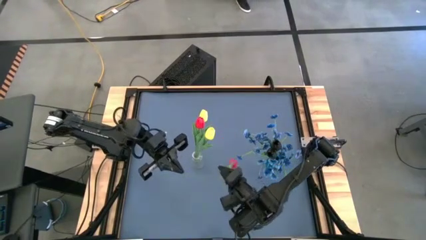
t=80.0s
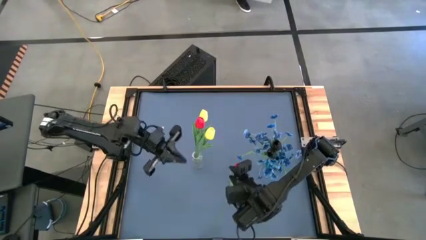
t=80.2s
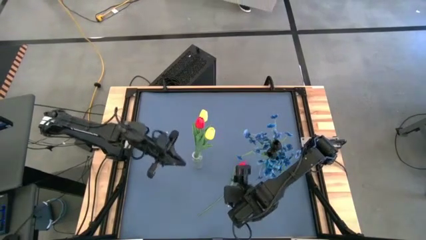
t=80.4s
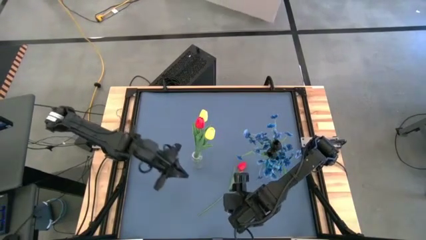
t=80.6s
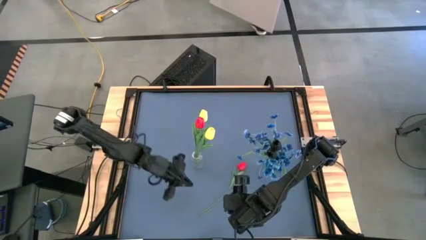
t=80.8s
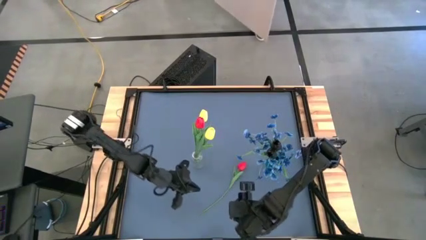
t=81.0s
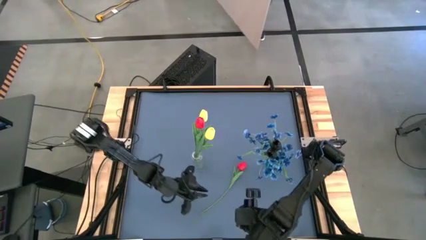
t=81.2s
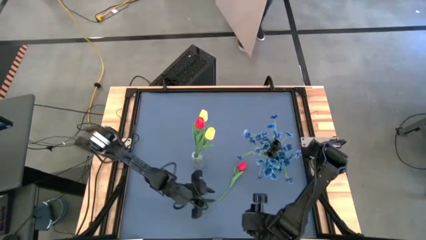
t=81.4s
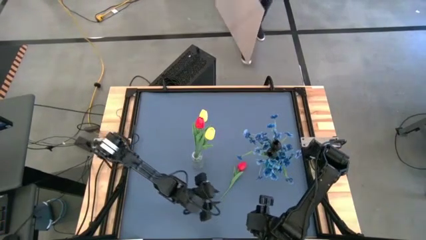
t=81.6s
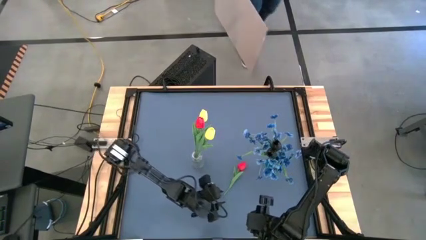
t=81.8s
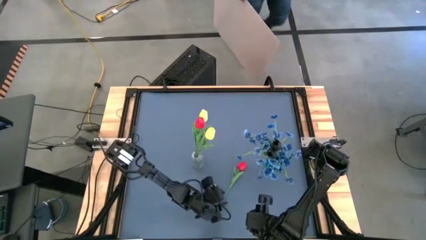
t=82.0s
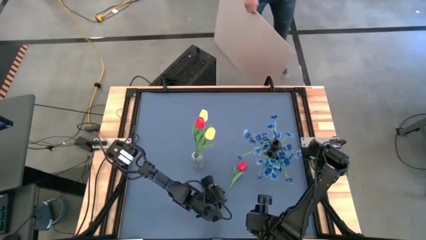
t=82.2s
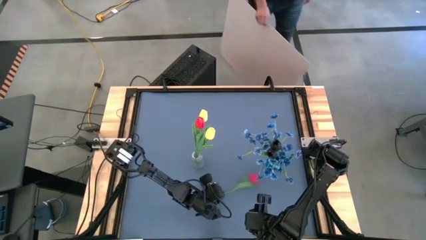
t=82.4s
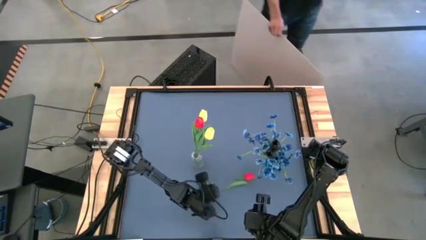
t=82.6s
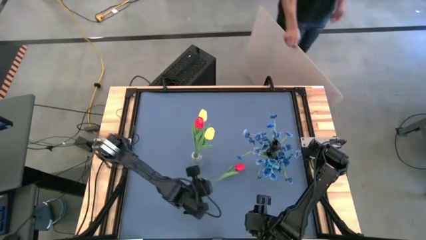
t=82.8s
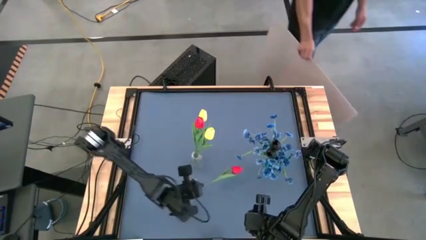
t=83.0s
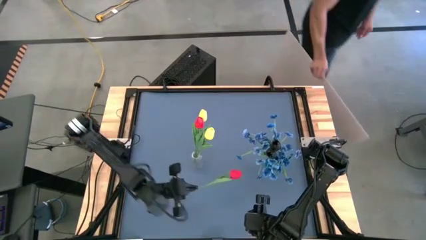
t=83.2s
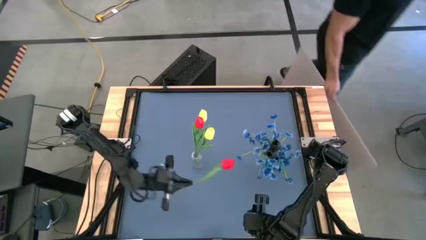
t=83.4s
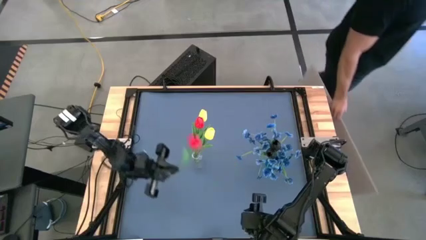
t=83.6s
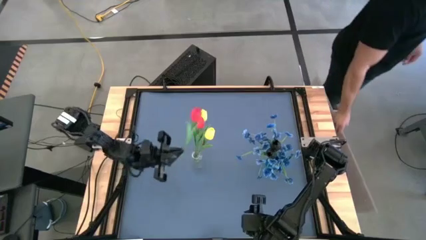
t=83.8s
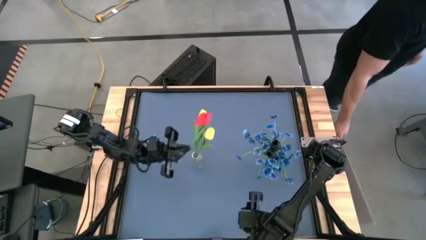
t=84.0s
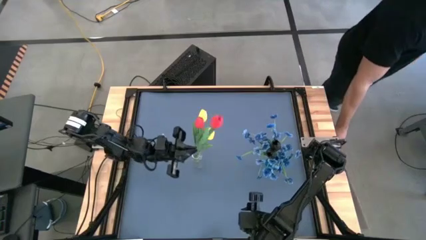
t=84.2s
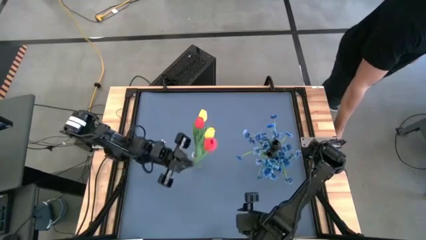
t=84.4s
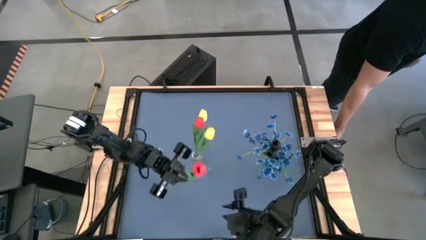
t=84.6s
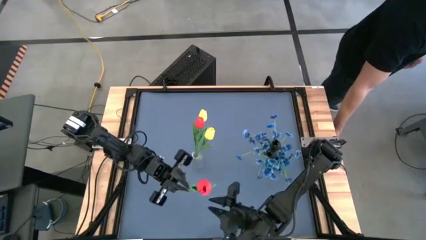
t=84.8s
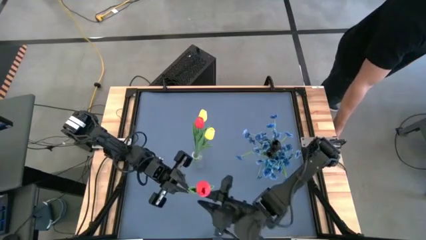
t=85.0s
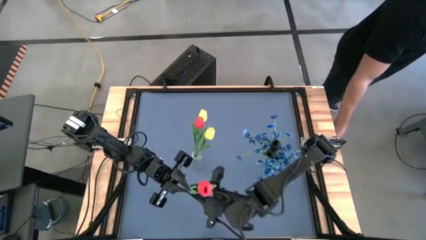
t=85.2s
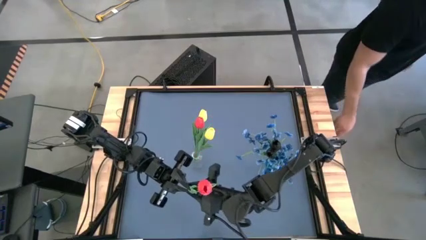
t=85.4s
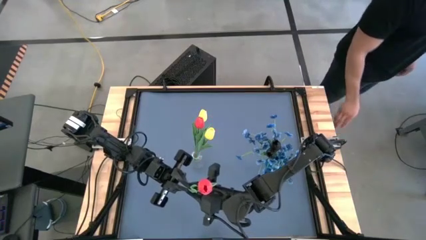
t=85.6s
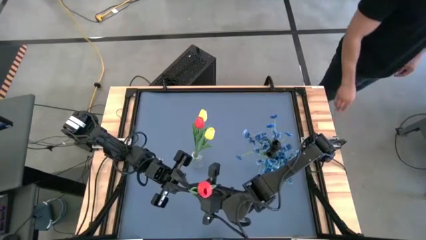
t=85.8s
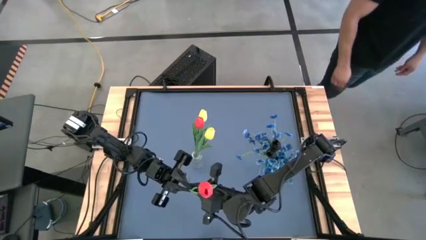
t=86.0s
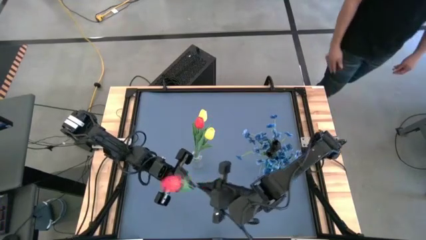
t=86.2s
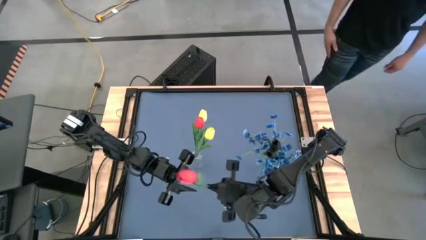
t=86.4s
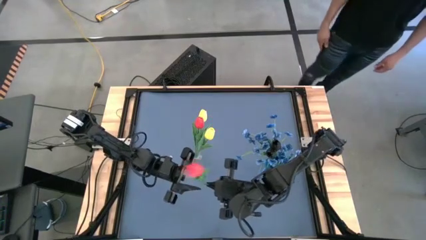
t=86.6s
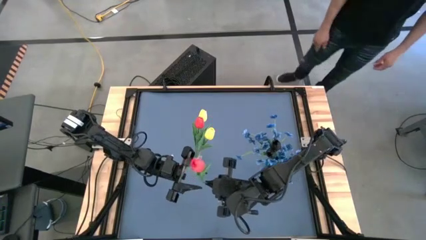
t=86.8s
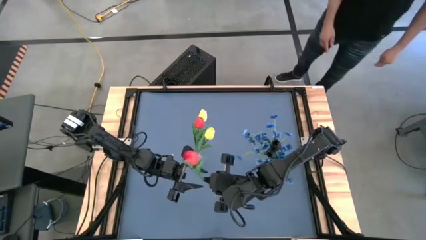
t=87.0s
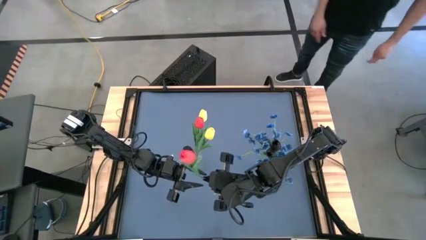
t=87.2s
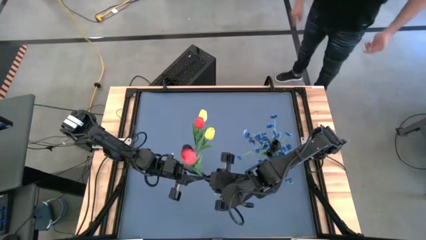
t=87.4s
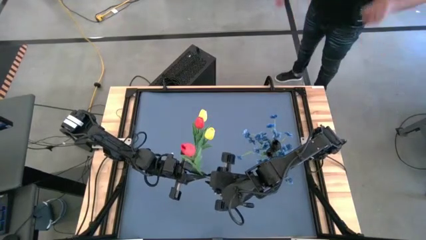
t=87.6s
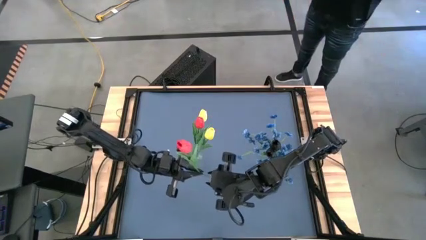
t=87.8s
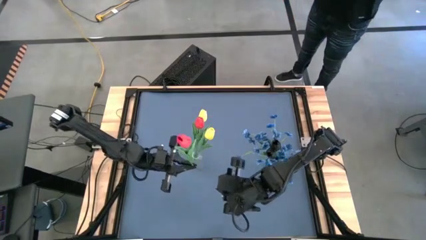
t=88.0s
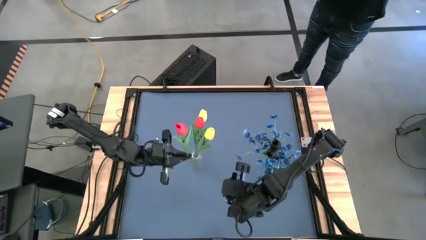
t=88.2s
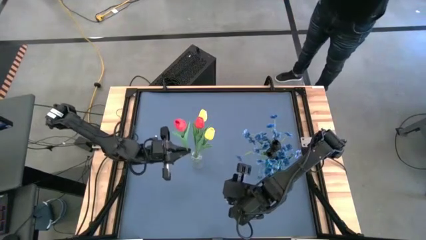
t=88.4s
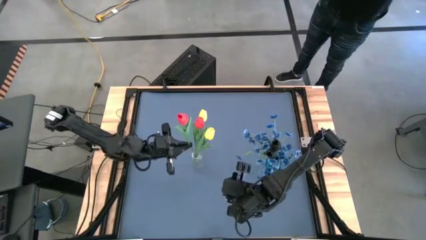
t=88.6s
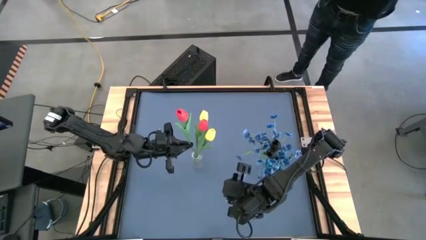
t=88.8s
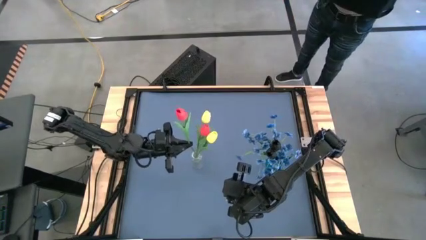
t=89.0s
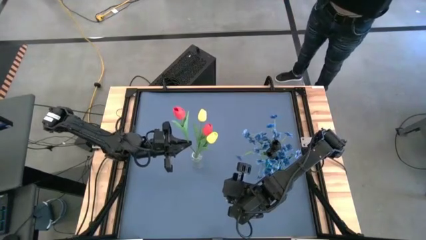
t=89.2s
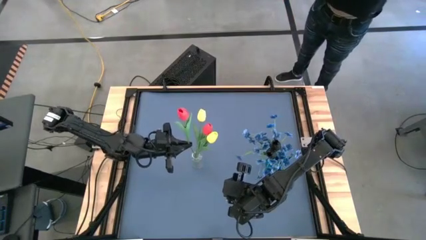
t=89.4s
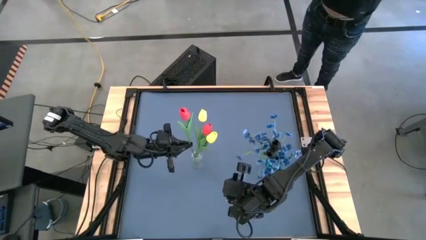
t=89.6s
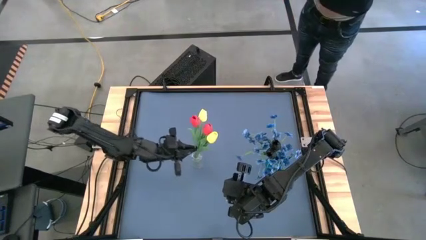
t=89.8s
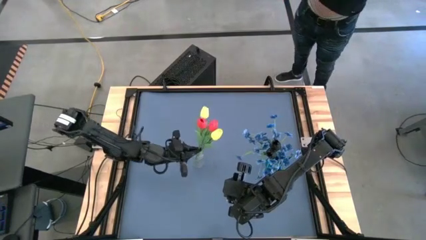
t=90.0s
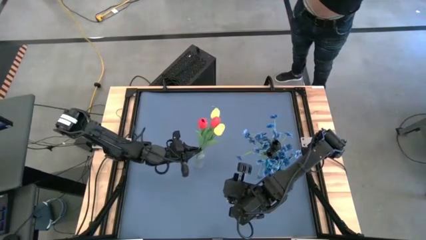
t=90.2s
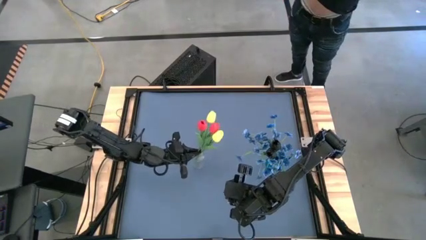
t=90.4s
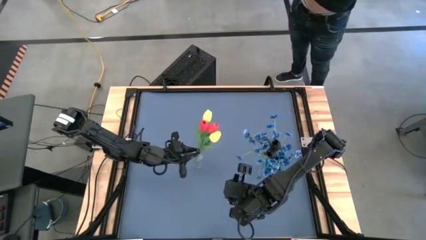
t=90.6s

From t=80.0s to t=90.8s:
Task: Sort flowers into vase by color
Put the red flower into the transparent vase

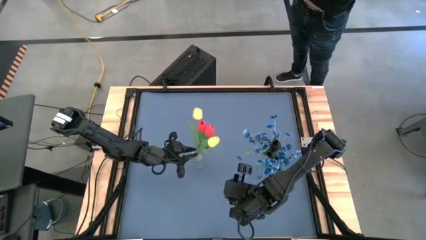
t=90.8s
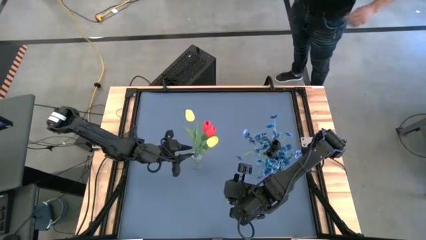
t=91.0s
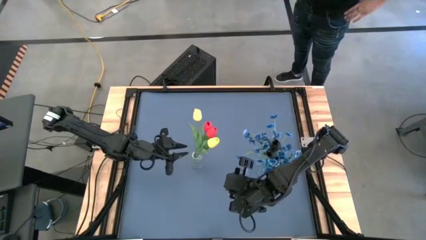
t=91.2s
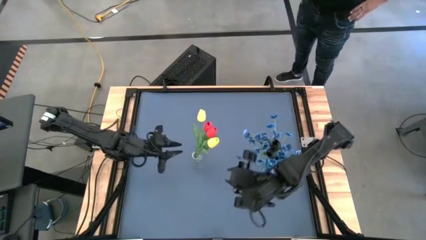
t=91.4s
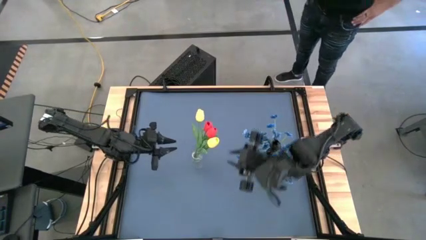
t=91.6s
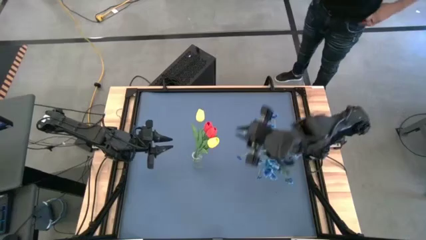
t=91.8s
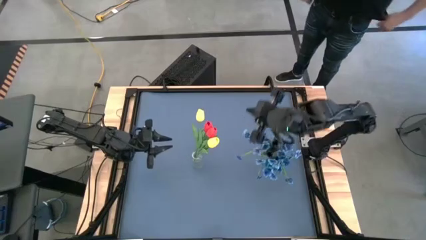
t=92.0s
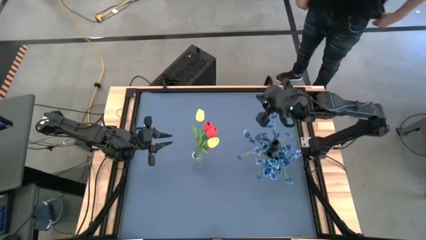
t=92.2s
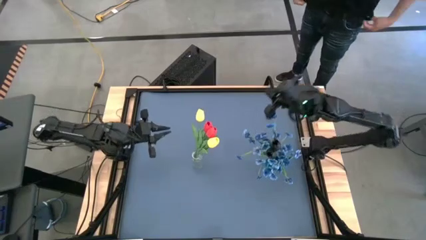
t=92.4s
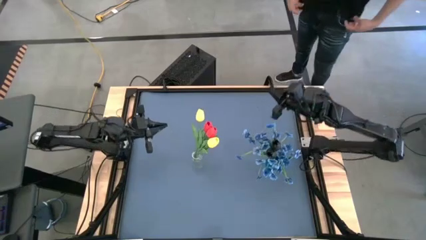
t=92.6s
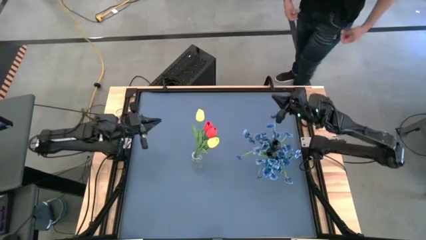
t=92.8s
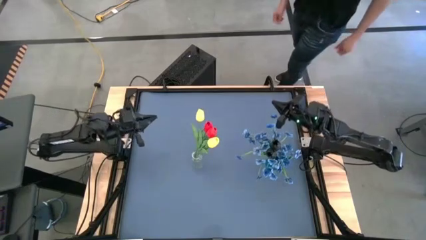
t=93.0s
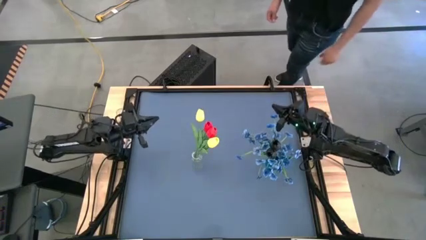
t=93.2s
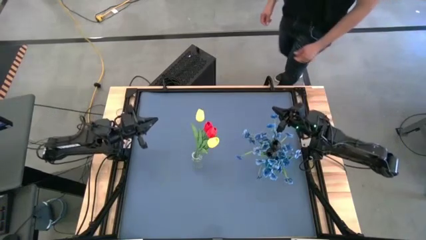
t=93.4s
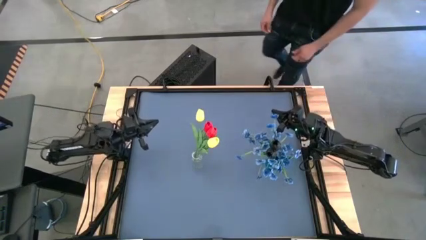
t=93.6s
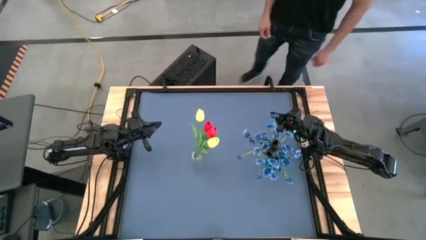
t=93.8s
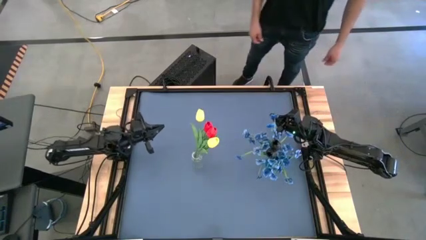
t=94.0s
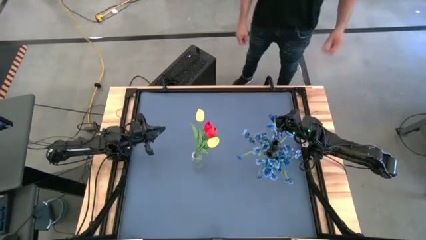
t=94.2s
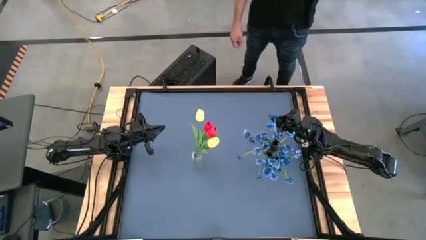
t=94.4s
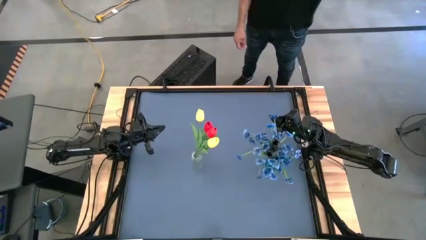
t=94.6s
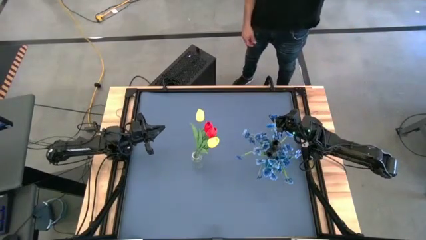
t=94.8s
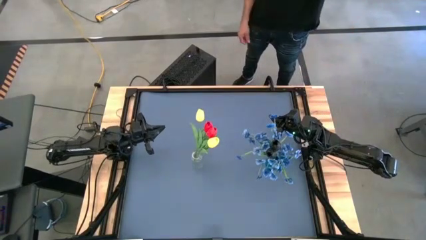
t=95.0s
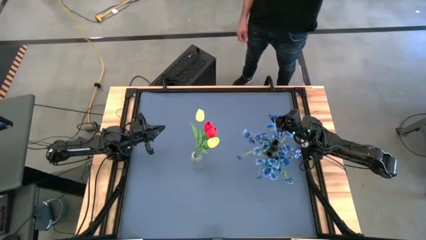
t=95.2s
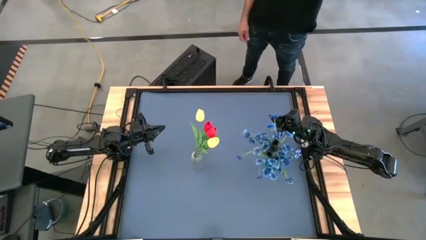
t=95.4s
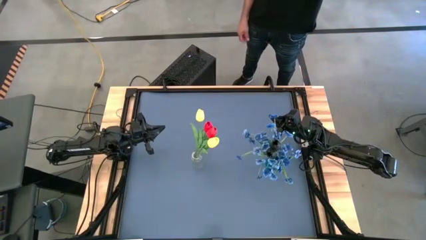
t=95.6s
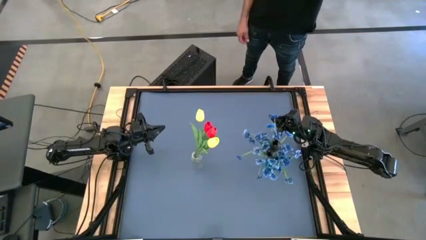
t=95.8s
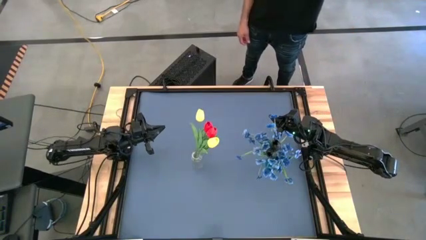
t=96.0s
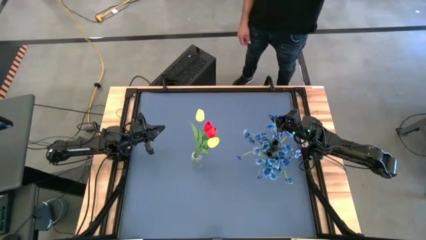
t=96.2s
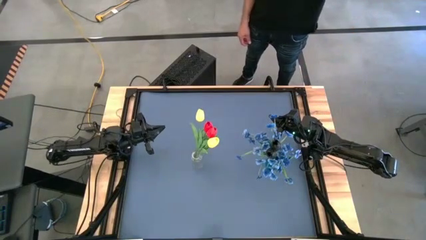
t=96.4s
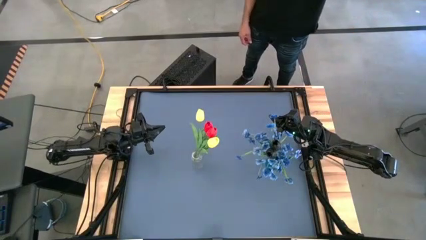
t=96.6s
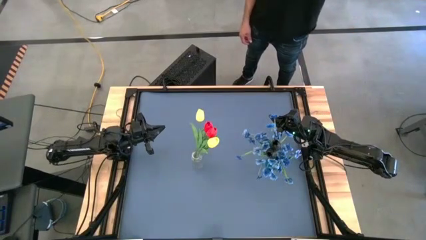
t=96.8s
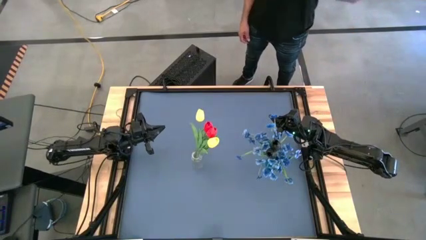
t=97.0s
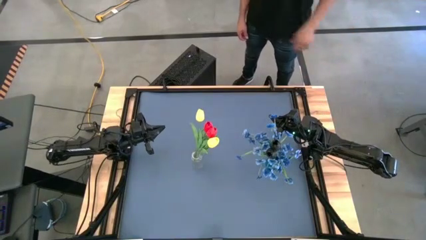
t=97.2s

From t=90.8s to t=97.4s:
Return to Home Position
